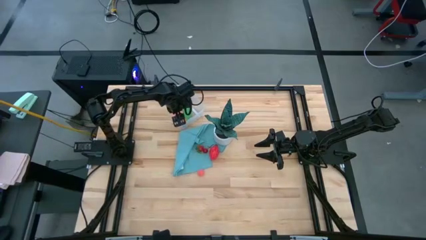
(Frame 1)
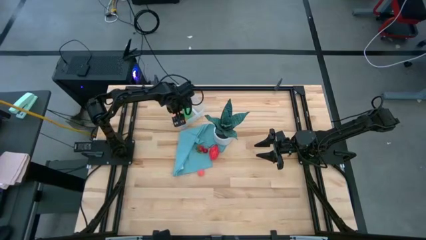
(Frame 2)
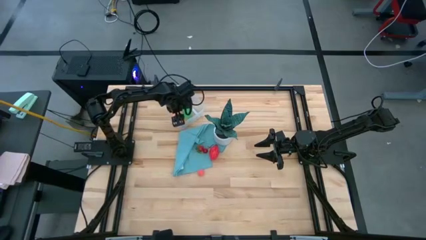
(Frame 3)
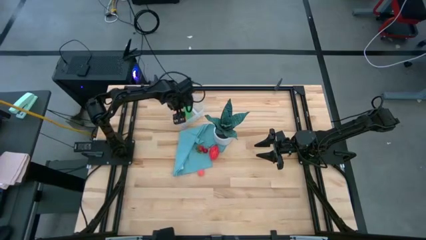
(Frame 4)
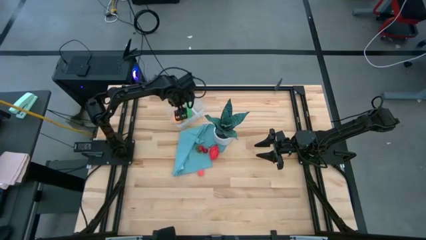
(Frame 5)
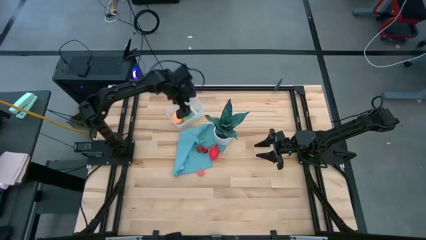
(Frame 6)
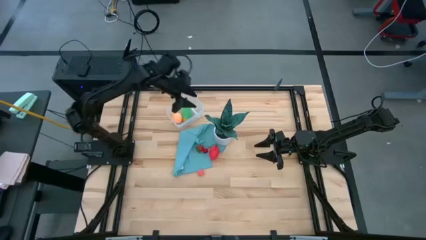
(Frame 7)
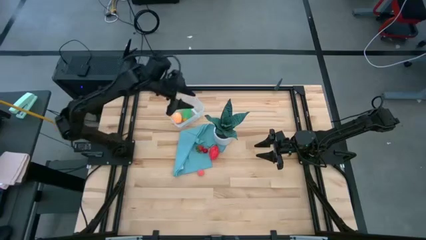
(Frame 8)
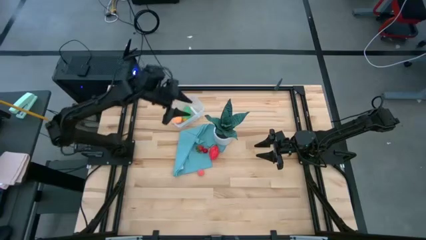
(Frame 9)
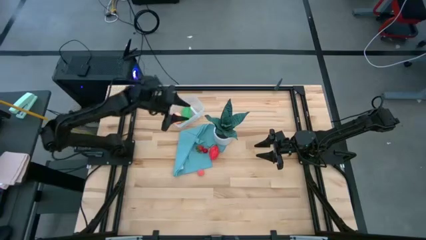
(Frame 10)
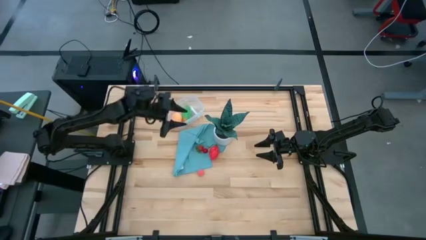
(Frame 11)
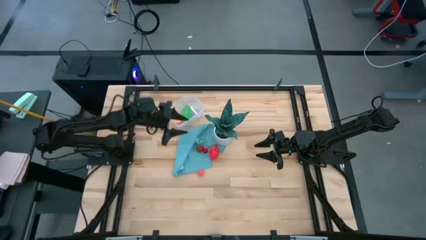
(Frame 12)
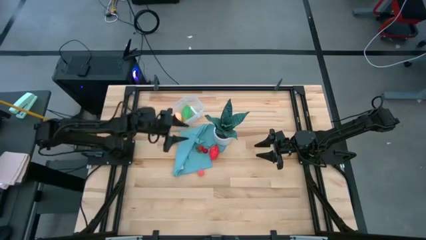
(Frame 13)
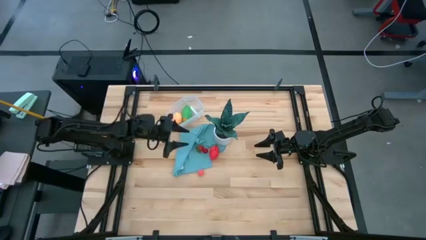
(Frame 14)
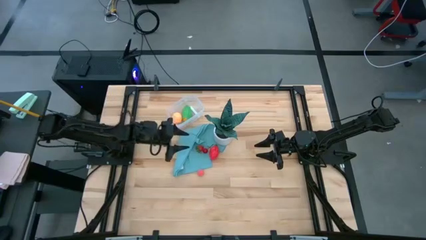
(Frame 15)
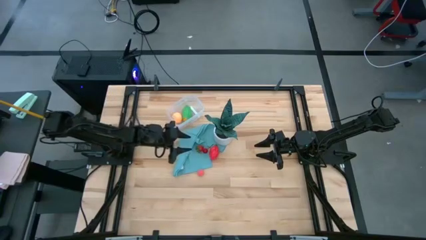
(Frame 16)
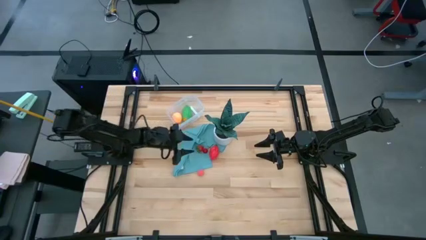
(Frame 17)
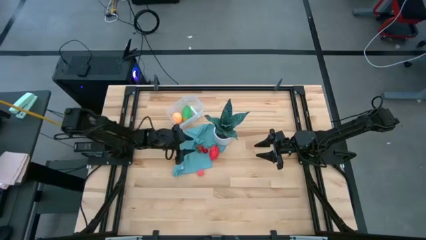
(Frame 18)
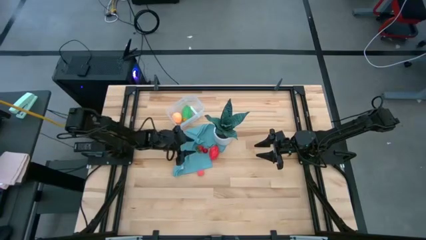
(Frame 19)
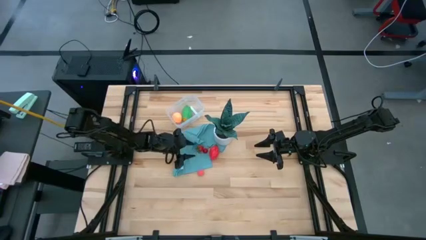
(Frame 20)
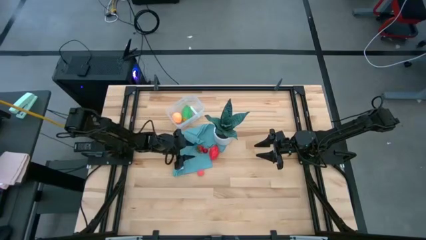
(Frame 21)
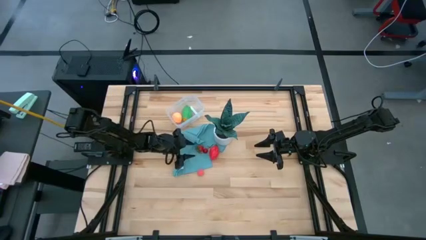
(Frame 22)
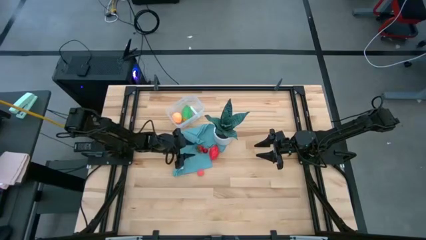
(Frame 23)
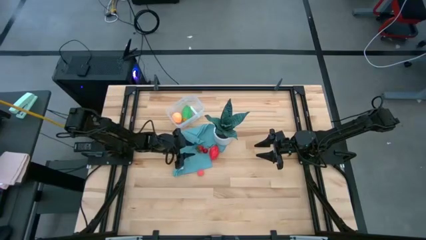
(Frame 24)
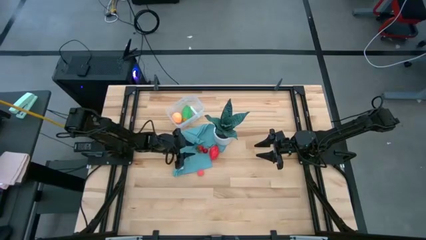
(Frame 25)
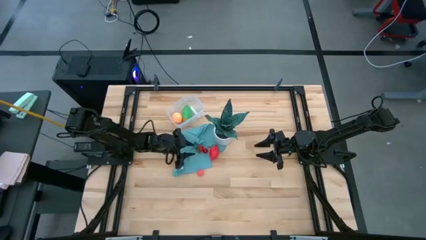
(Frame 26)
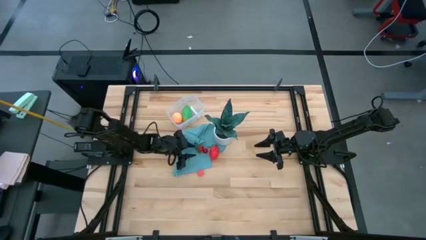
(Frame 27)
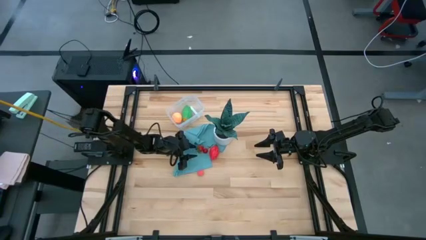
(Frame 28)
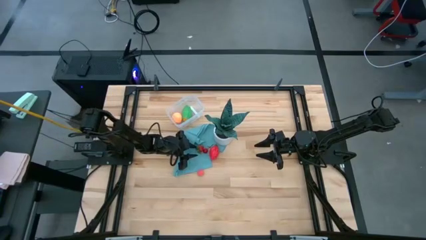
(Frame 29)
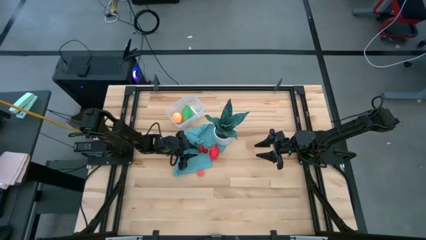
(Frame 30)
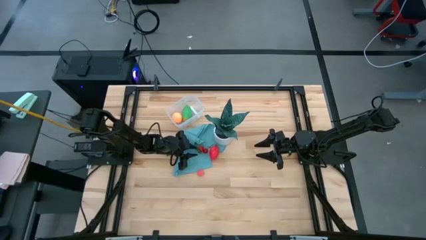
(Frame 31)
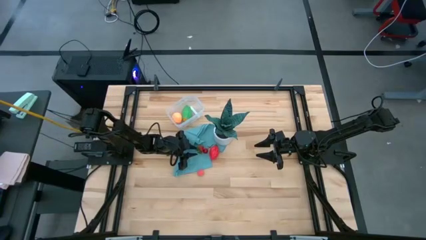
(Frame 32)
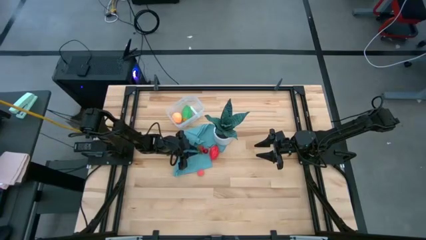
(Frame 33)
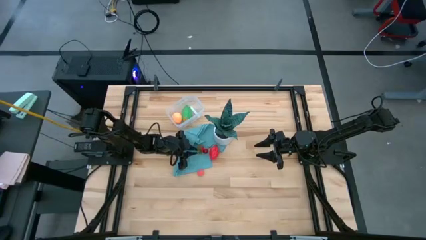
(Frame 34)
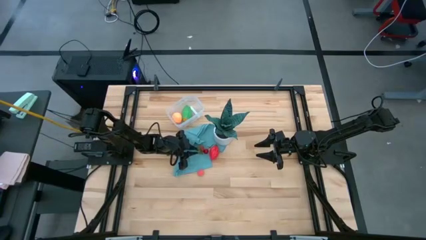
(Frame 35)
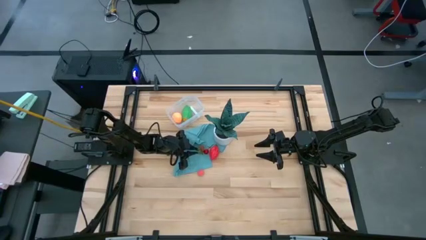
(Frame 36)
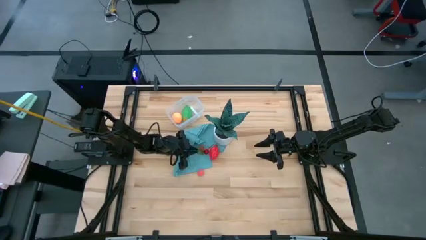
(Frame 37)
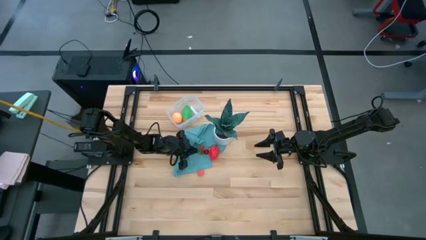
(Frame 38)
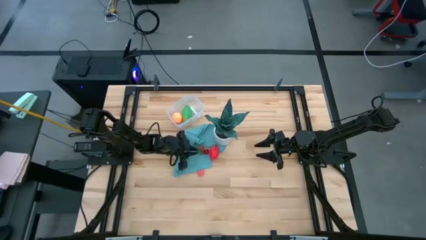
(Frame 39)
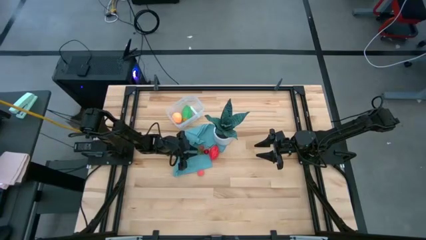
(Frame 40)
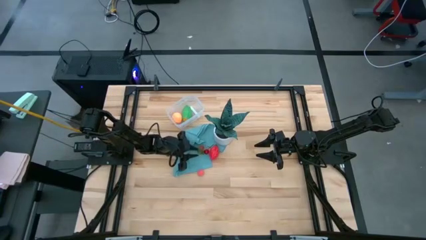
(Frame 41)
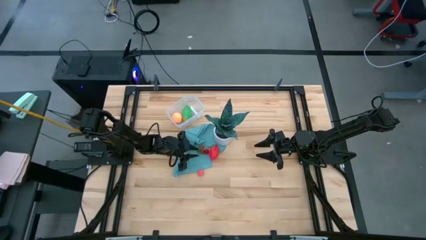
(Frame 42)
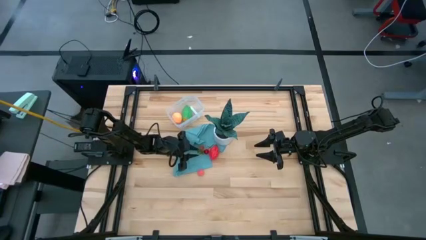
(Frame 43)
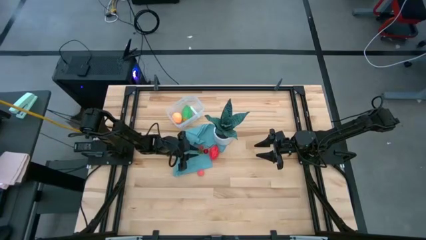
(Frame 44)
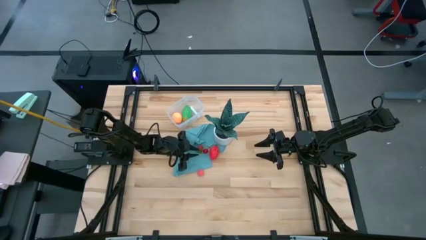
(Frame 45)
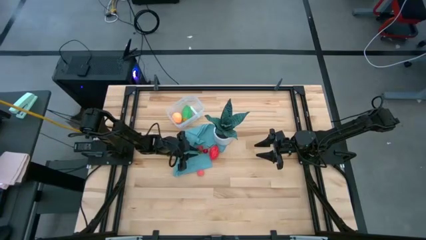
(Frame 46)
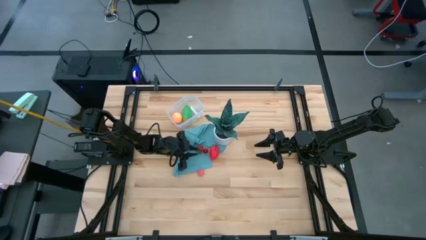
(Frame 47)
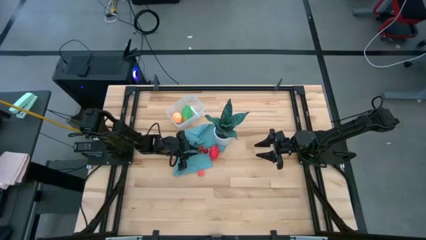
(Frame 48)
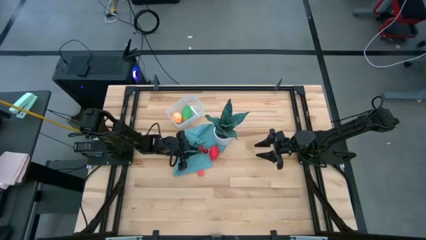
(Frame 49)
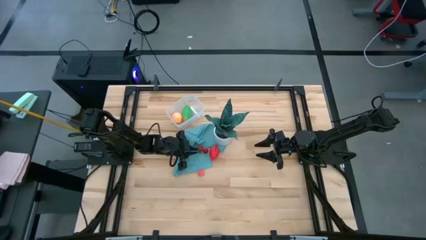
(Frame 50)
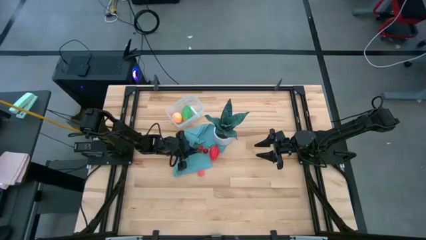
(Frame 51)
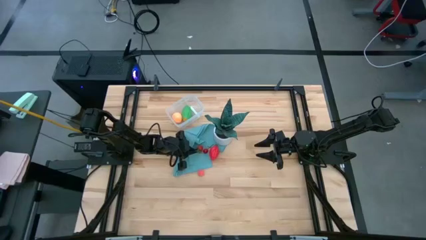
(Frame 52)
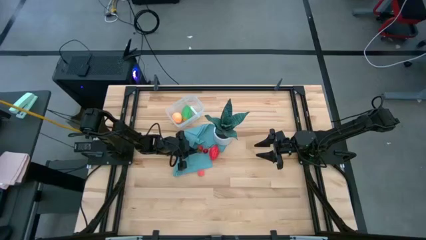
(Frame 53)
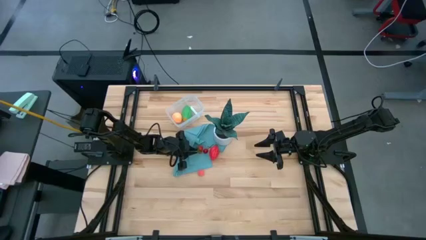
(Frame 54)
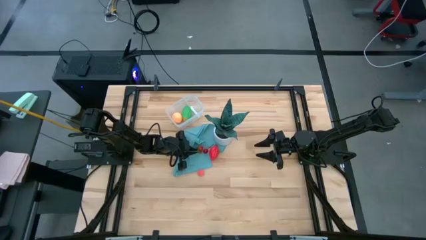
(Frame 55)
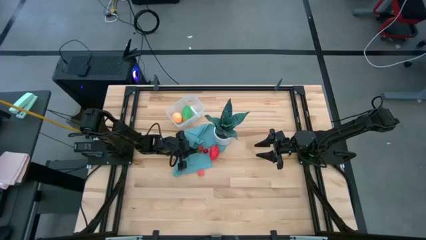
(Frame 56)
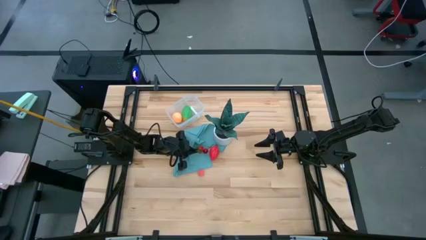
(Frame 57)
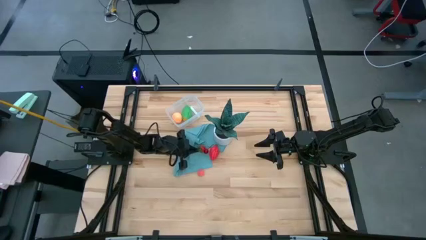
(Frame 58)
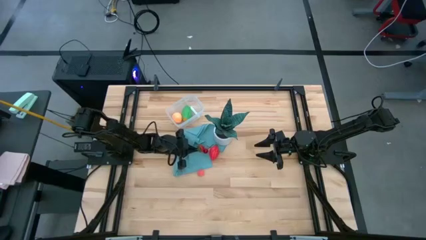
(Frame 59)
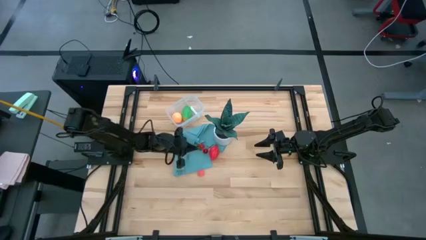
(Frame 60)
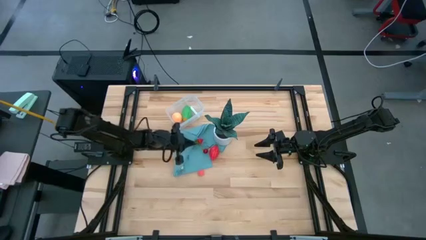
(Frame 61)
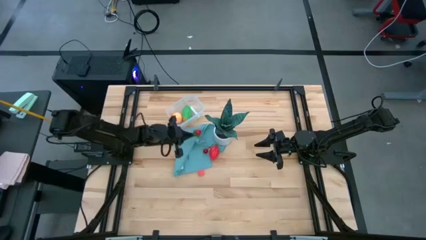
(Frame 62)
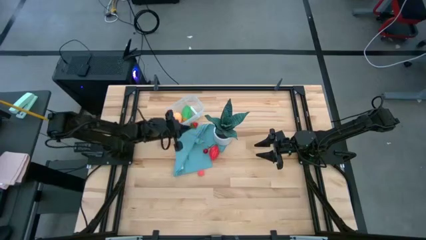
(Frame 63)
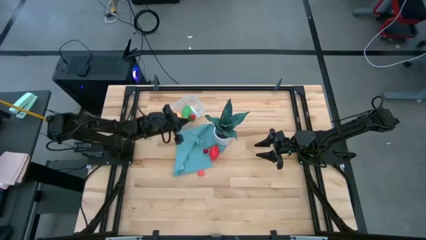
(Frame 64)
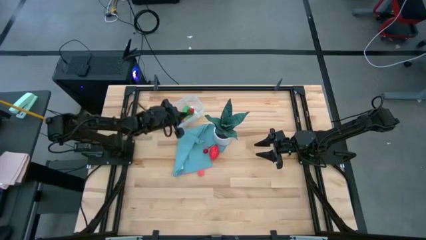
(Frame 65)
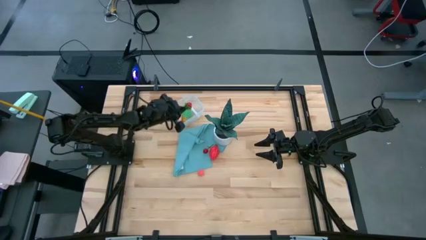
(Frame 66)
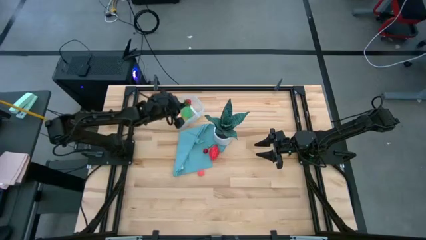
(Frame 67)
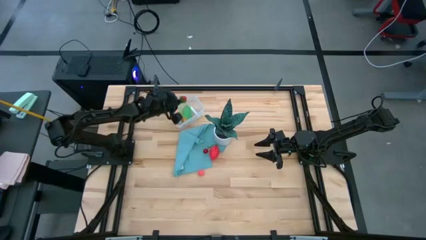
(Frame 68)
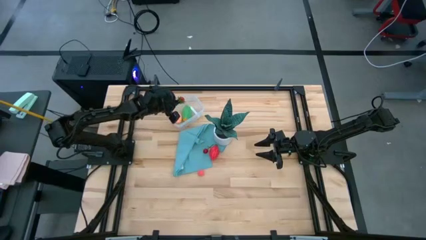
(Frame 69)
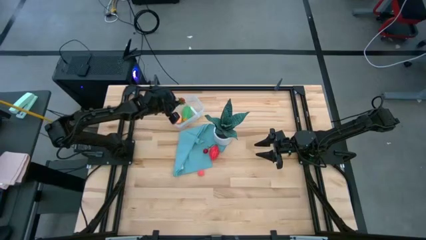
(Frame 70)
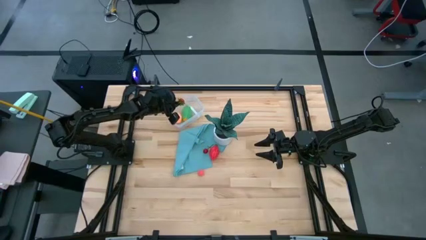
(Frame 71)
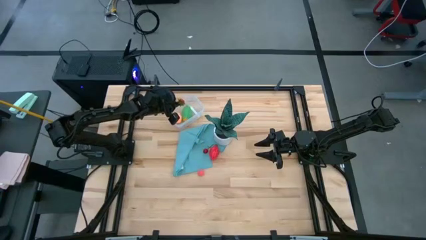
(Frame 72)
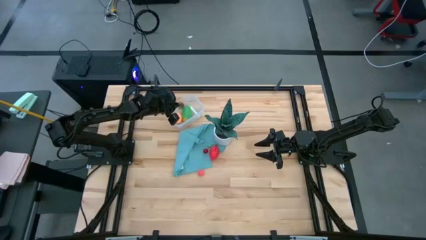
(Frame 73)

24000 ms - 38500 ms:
Task: Pick and placing Produce into tupperware
Put the strawberry into the transparent bin
